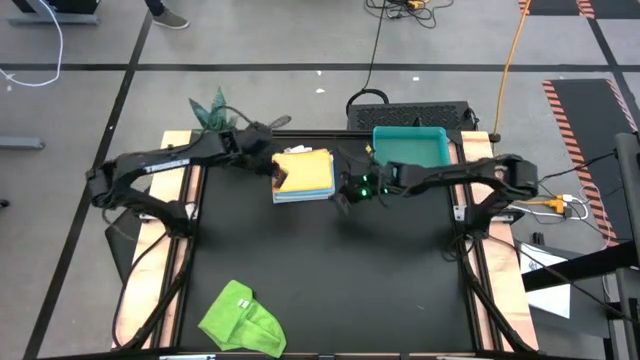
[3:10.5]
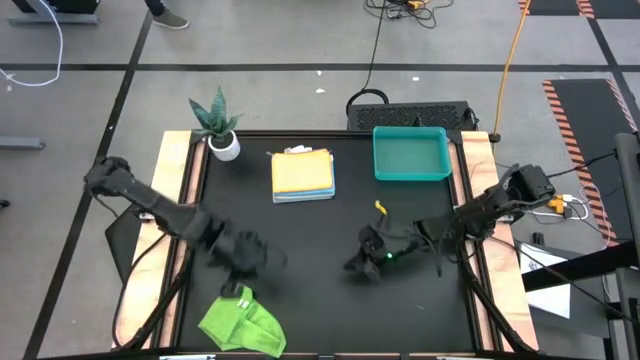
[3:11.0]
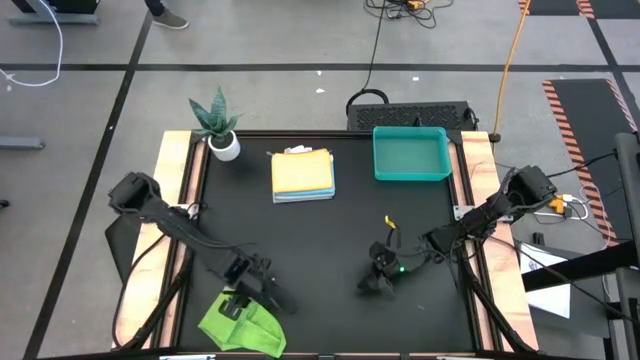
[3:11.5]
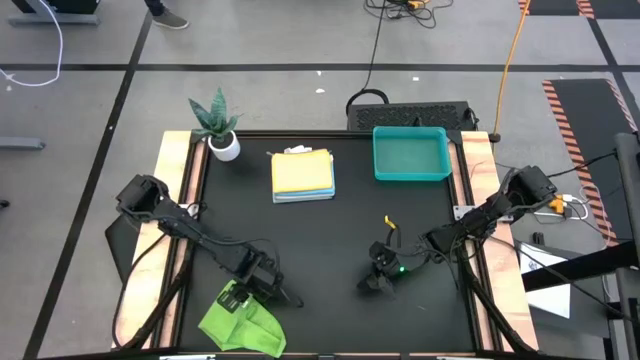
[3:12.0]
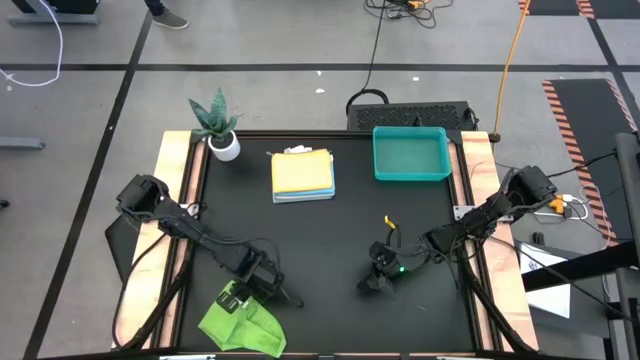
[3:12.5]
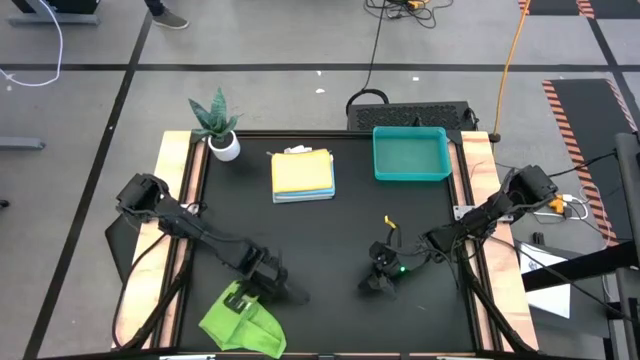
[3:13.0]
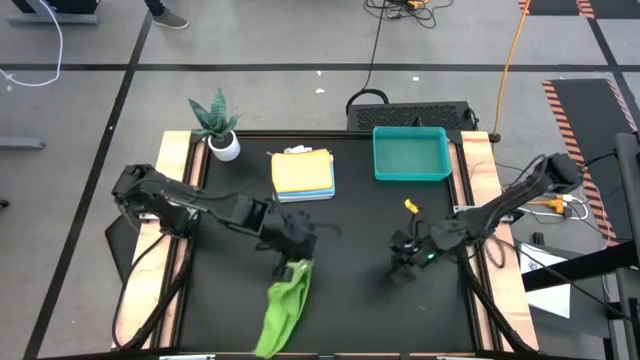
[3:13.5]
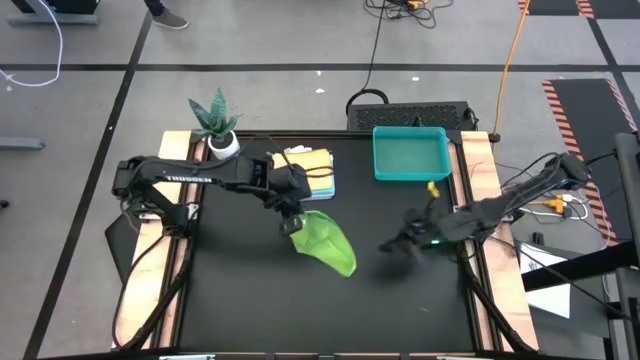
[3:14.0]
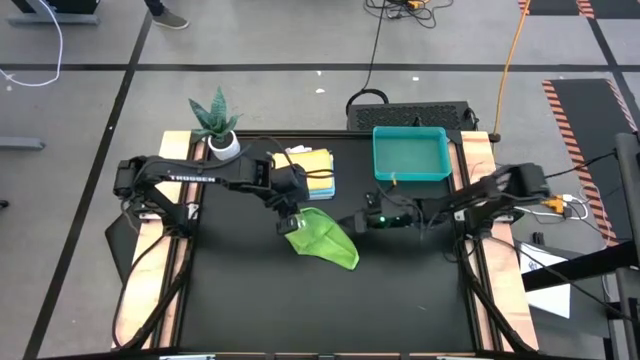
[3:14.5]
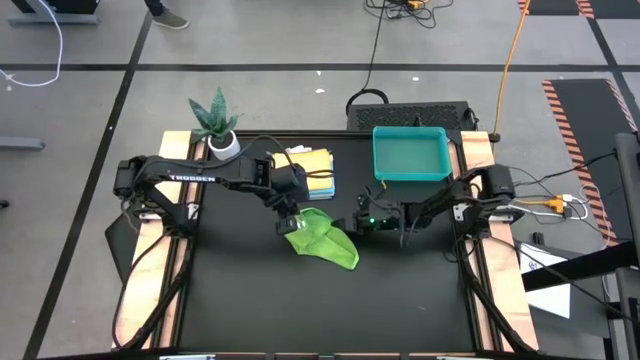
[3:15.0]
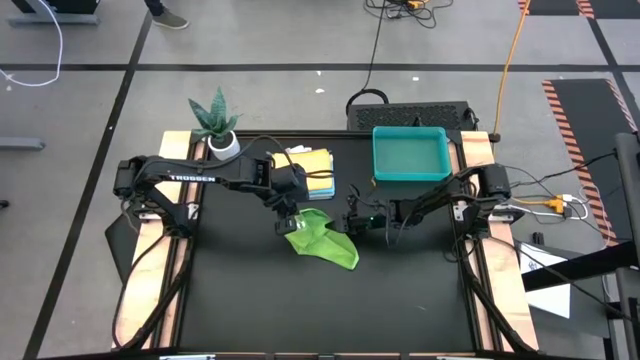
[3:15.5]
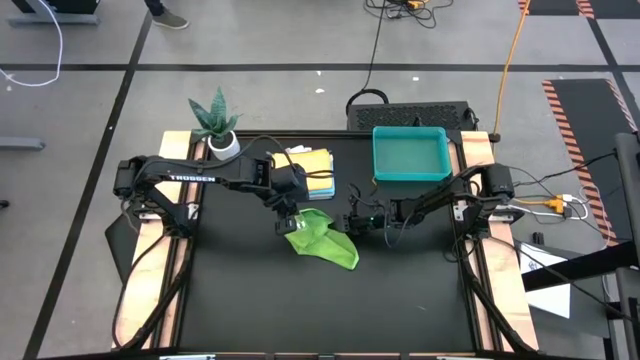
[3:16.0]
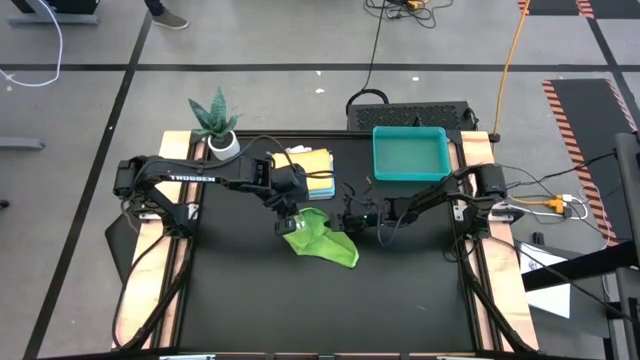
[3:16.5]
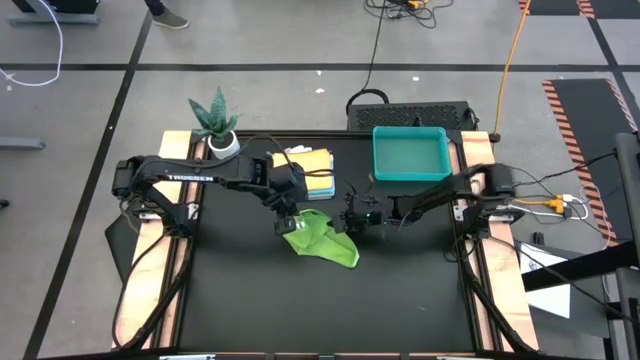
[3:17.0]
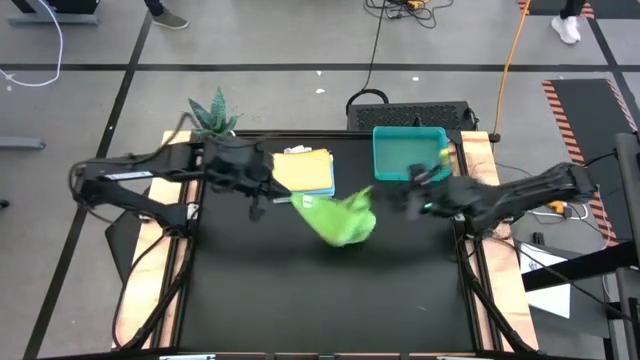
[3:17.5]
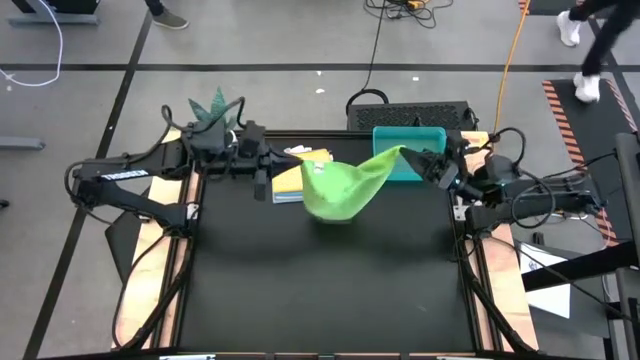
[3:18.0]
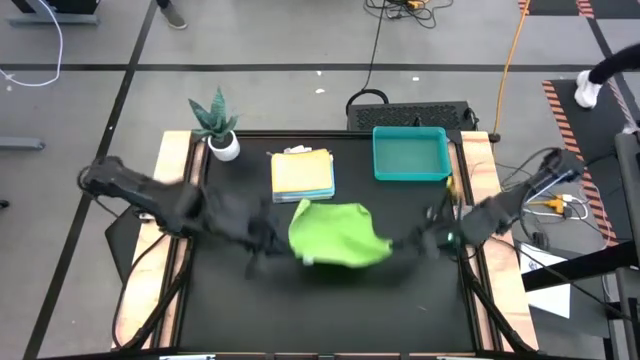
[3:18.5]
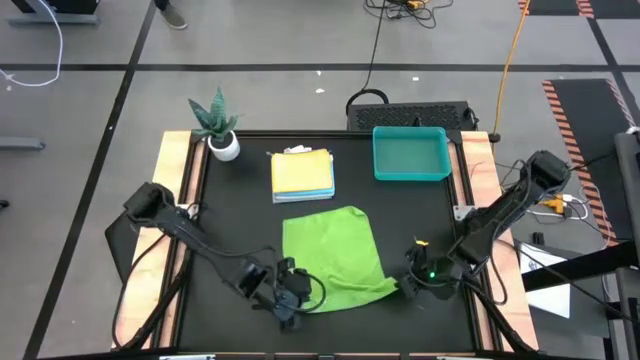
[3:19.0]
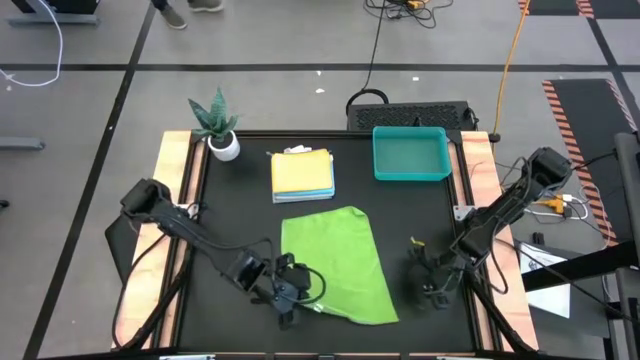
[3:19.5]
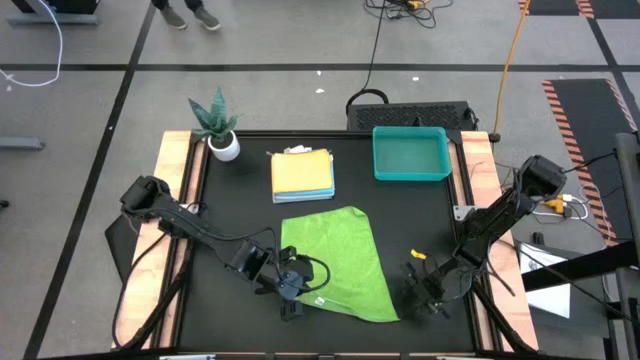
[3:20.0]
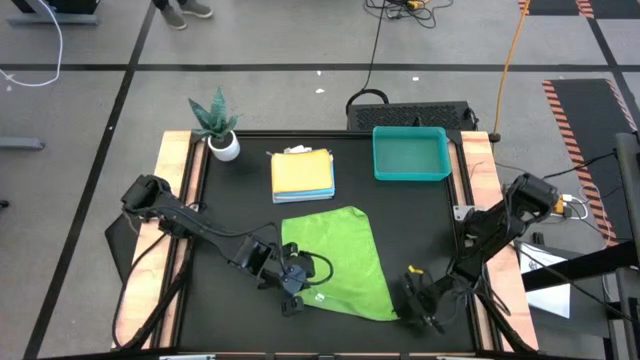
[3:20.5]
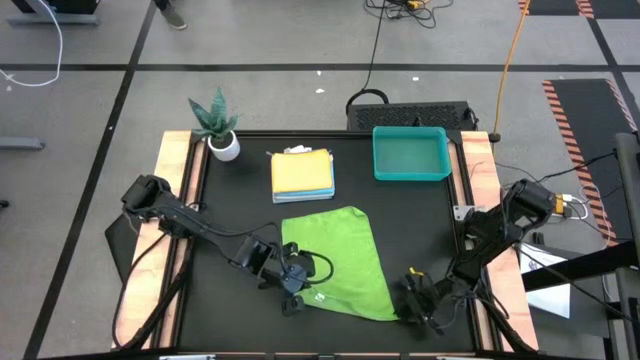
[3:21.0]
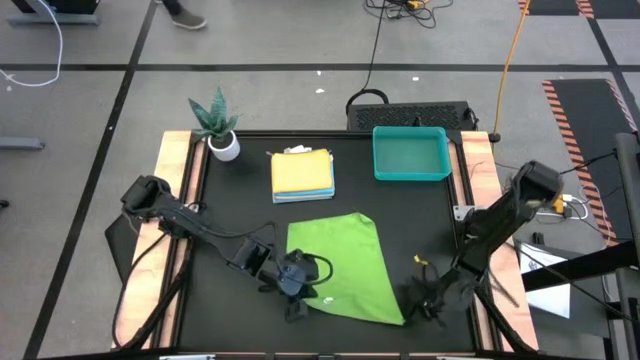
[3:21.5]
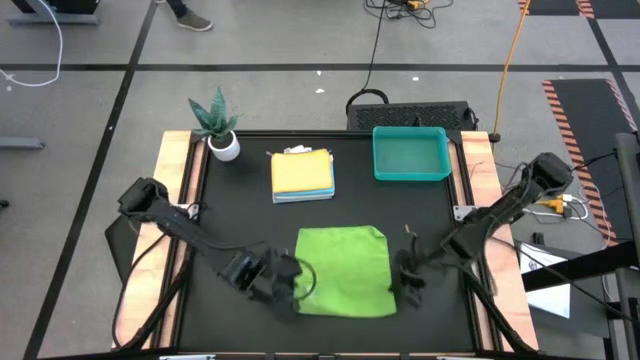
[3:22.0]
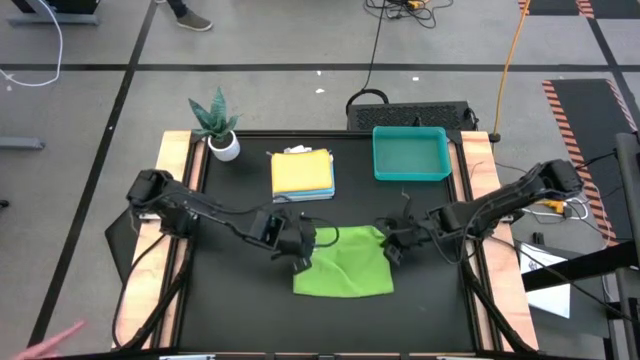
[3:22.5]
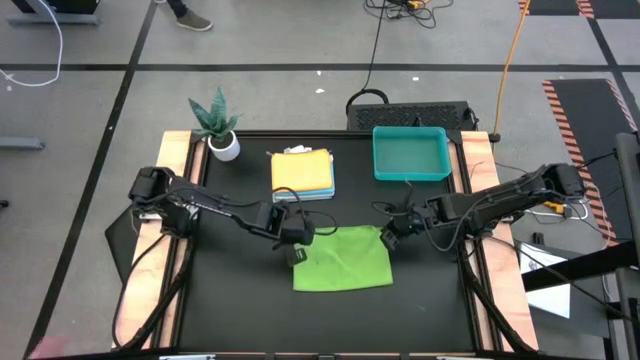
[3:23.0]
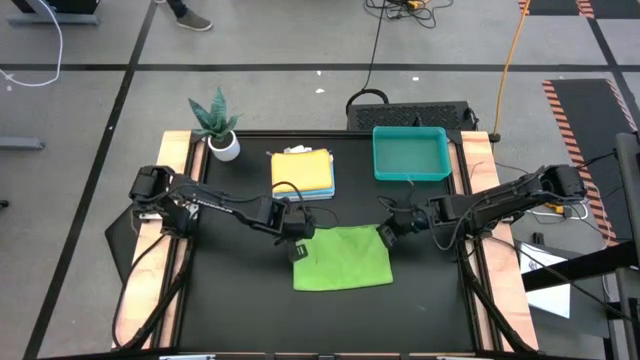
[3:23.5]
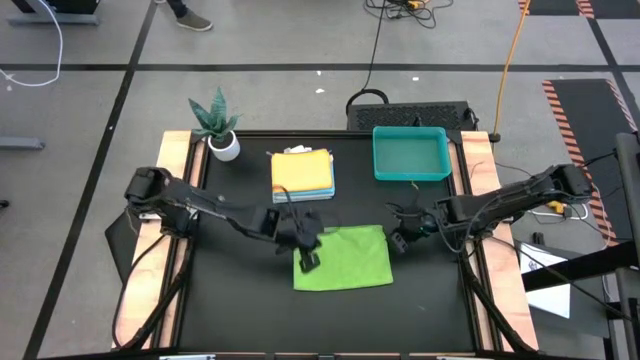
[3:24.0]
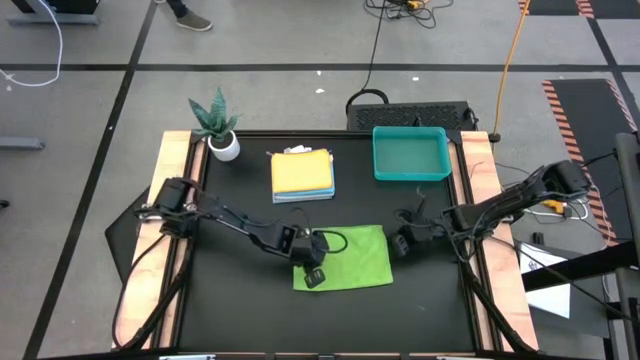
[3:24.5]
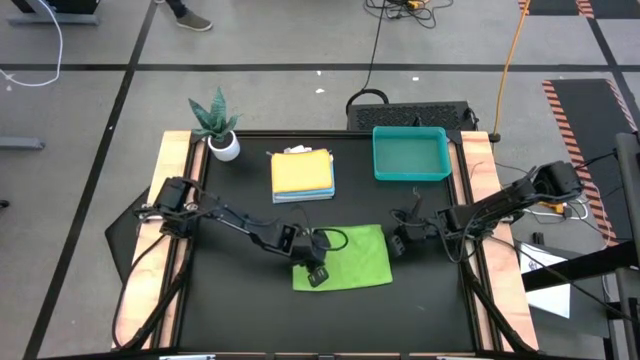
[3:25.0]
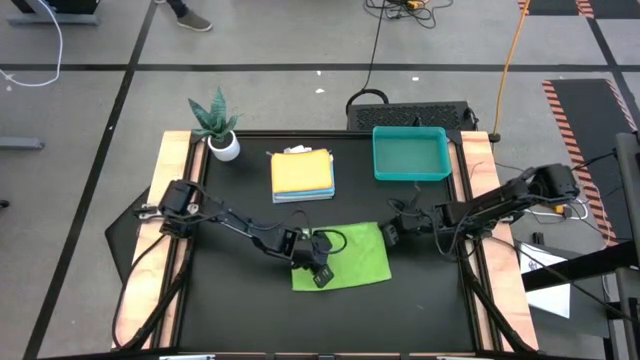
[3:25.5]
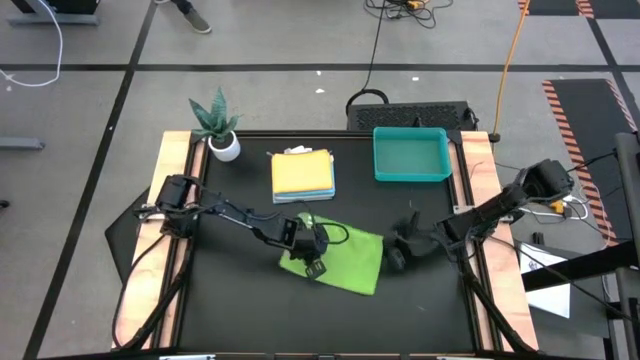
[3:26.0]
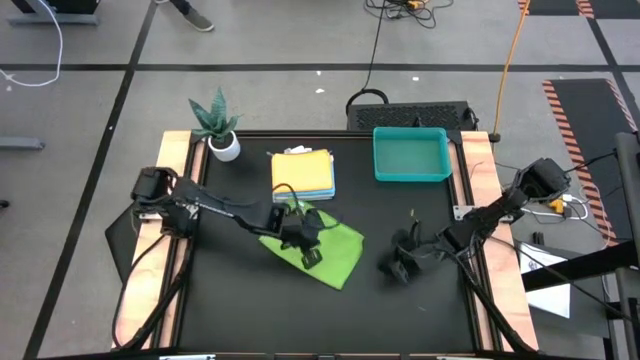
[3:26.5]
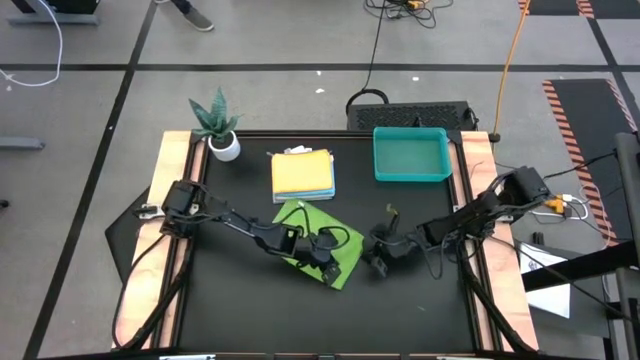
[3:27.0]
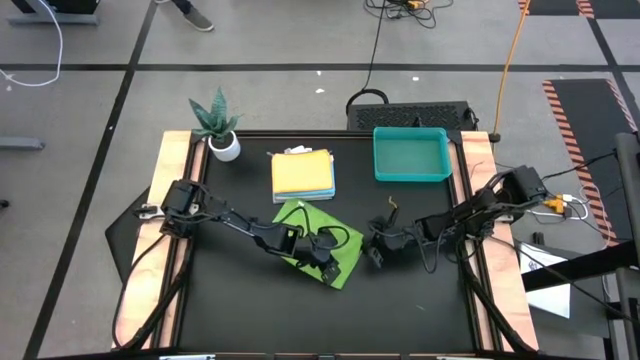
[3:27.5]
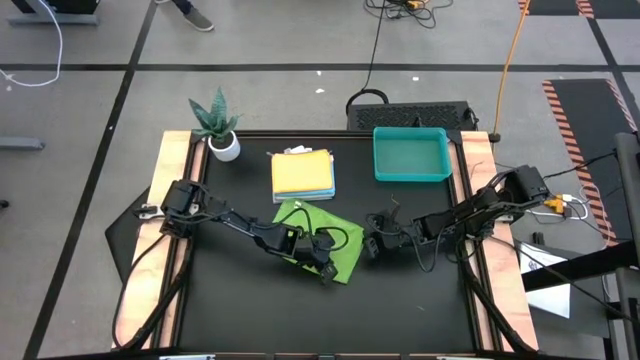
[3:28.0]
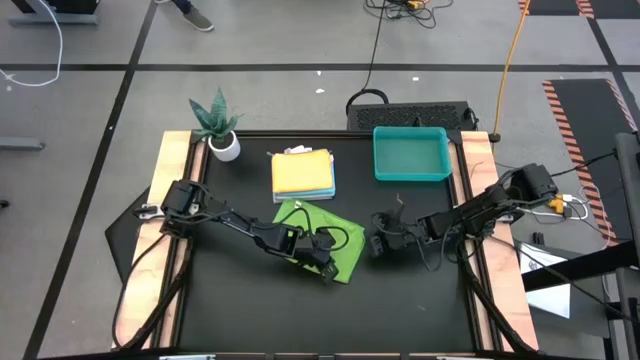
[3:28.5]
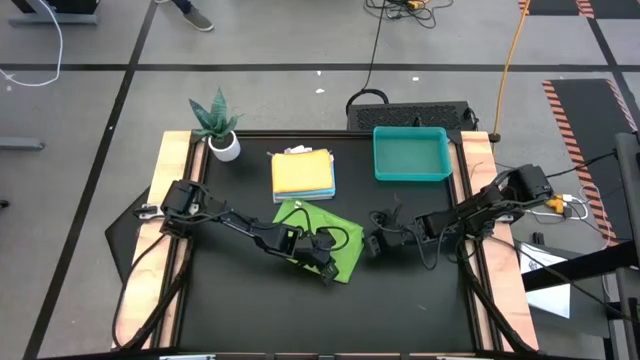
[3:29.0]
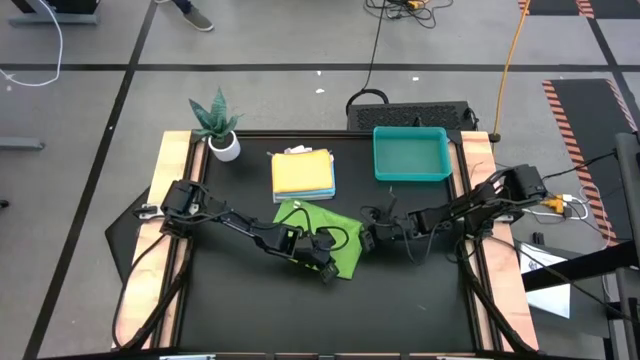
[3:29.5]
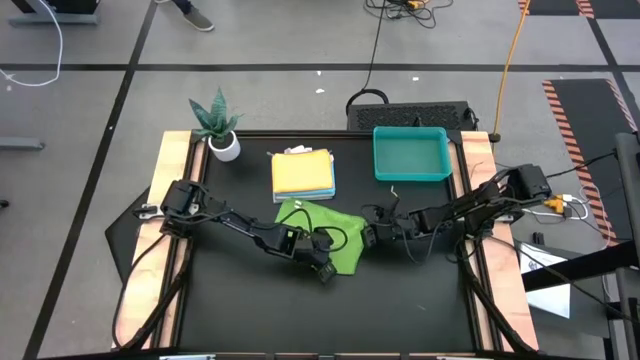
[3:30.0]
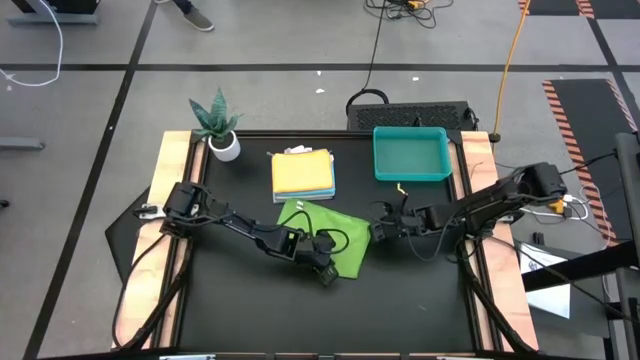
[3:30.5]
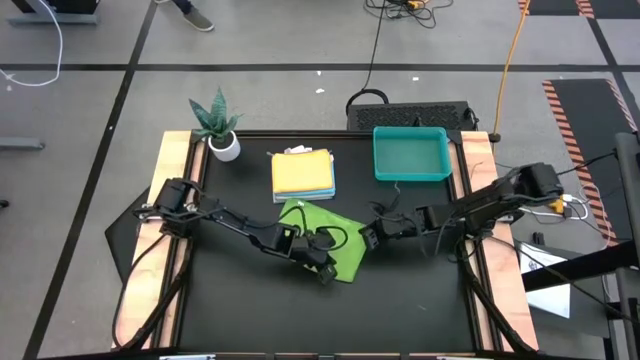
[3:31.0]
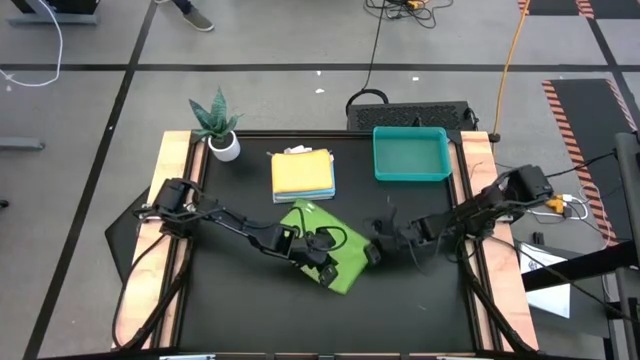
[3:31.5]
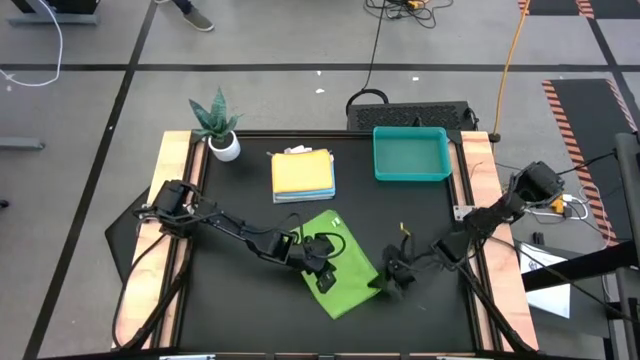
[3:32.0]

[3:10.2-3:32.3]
Task: Fold microfiber towels
Fold the green microfiber towel

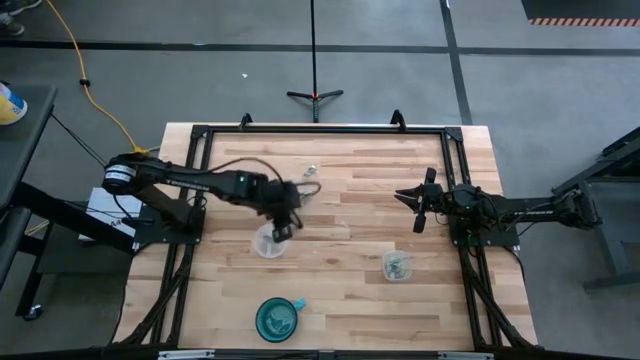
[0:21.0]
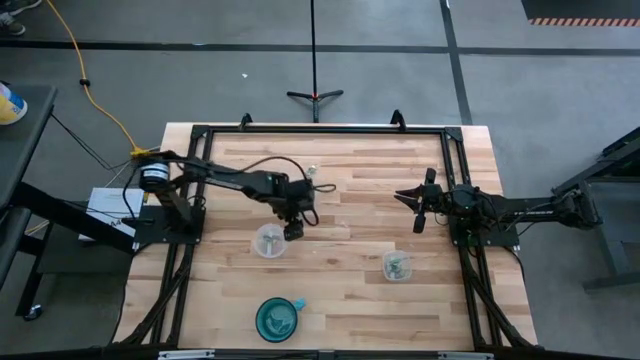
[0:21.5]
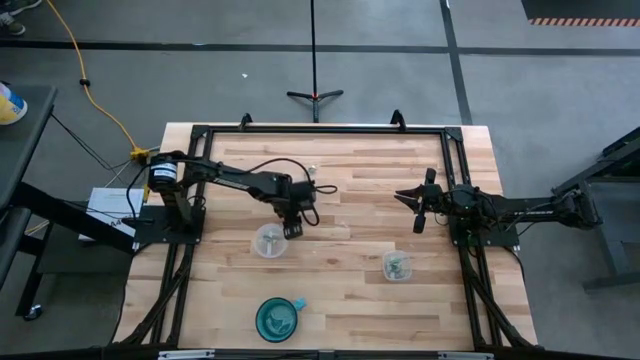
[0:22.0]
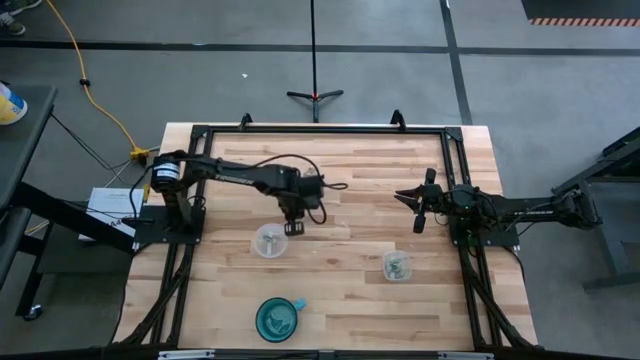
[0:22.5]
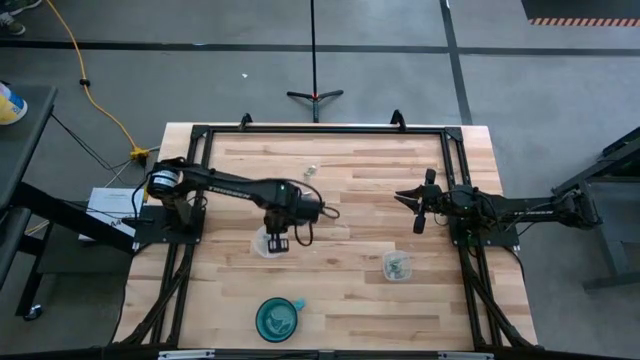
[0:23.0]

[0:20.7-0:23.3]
Task: Sort candy
Put the green candy into the circle transparent bin
